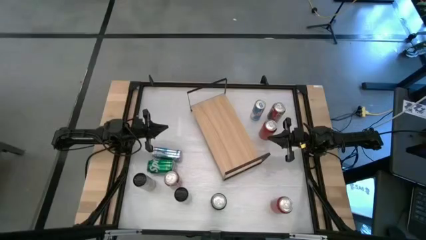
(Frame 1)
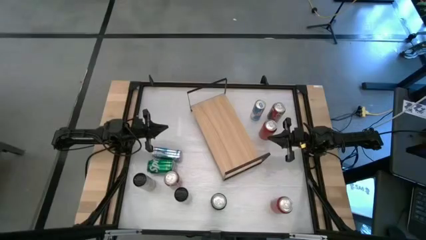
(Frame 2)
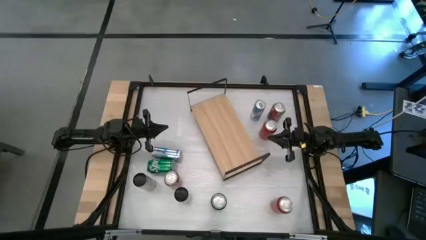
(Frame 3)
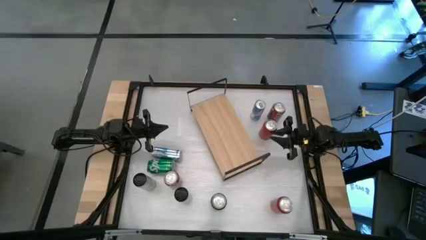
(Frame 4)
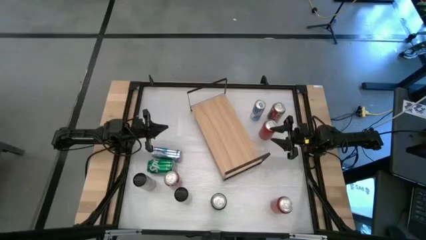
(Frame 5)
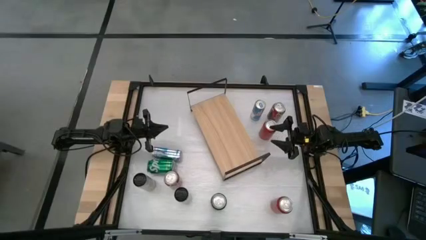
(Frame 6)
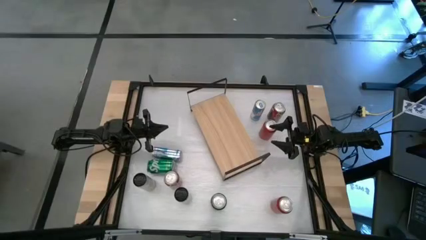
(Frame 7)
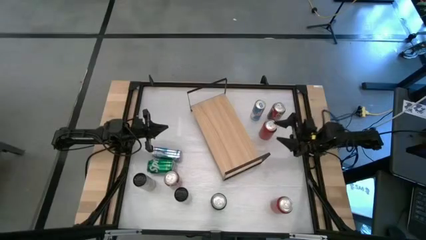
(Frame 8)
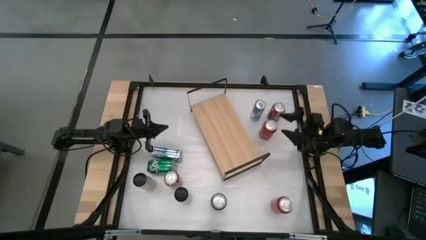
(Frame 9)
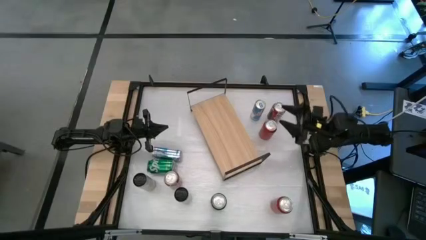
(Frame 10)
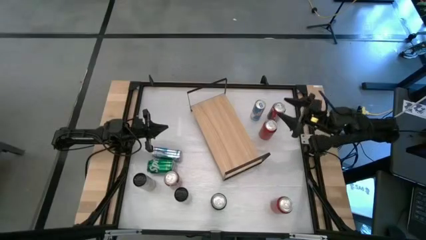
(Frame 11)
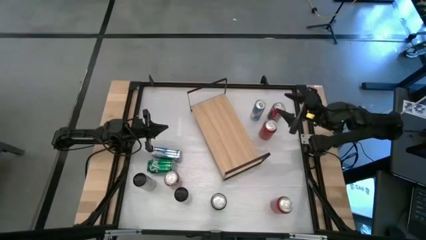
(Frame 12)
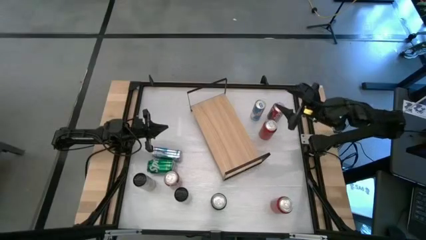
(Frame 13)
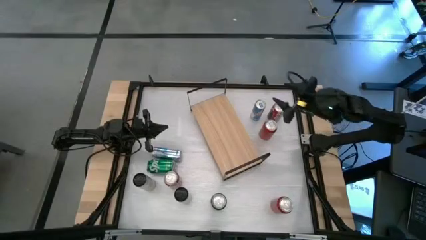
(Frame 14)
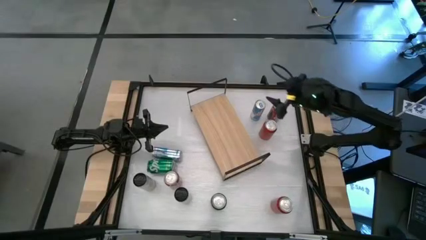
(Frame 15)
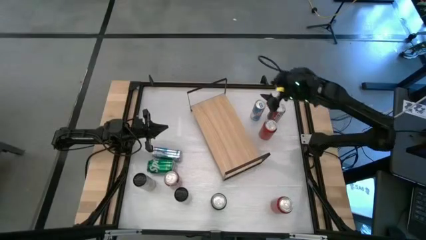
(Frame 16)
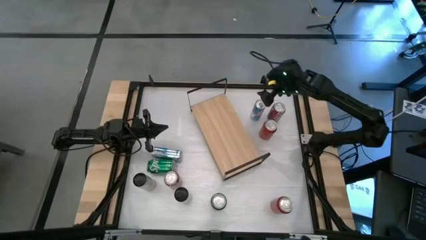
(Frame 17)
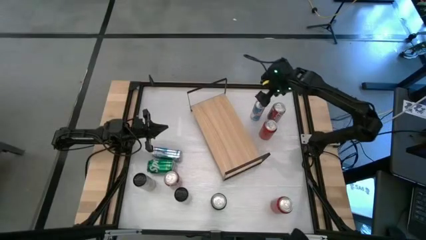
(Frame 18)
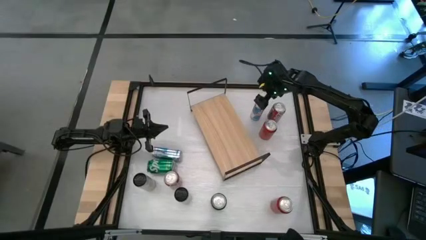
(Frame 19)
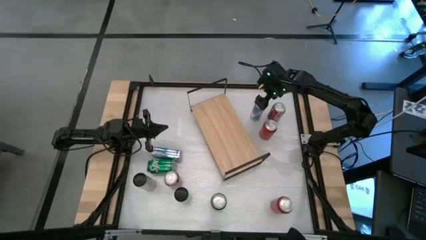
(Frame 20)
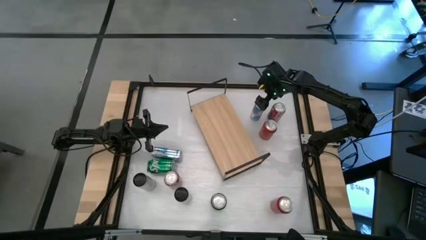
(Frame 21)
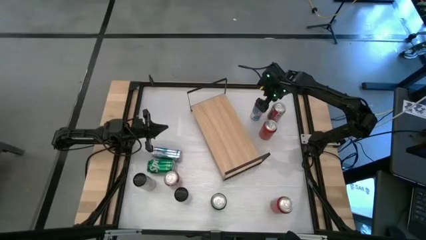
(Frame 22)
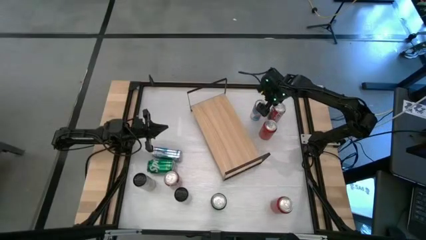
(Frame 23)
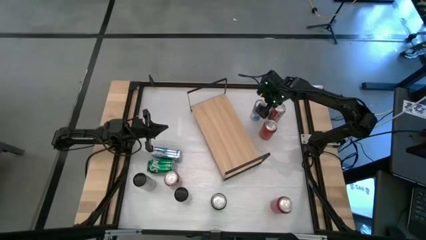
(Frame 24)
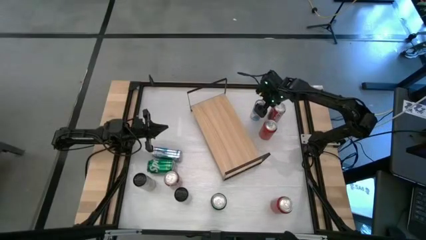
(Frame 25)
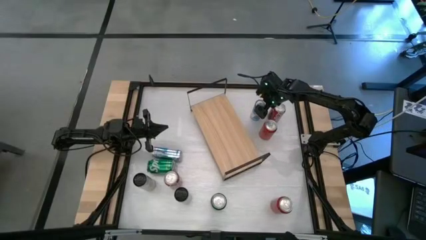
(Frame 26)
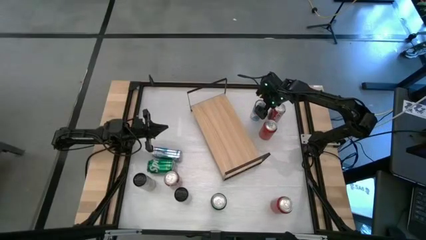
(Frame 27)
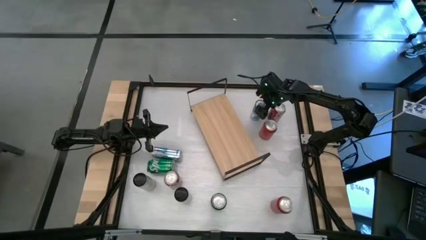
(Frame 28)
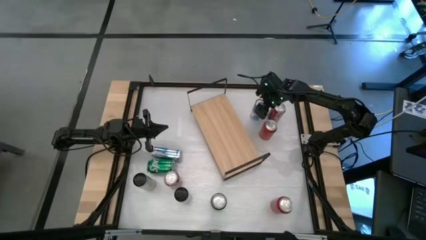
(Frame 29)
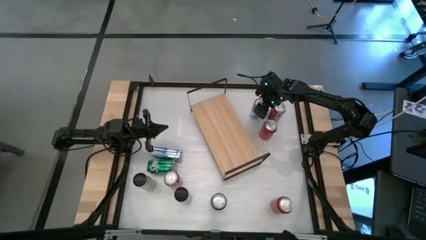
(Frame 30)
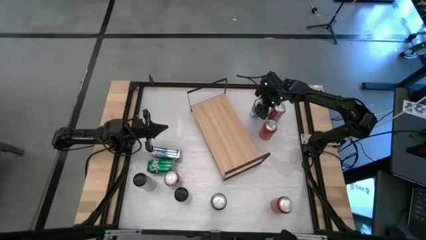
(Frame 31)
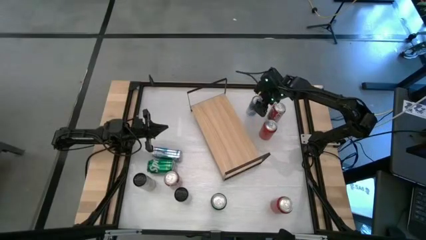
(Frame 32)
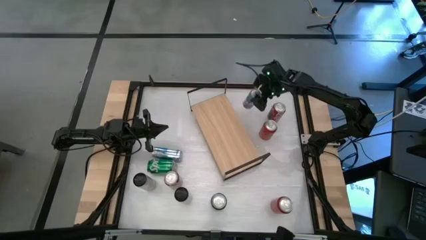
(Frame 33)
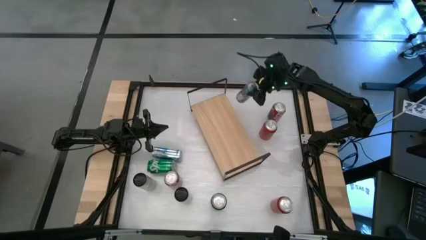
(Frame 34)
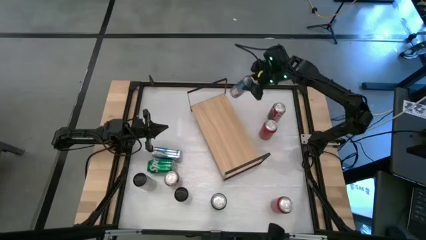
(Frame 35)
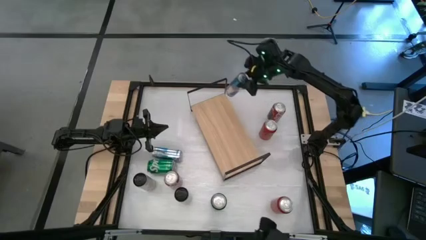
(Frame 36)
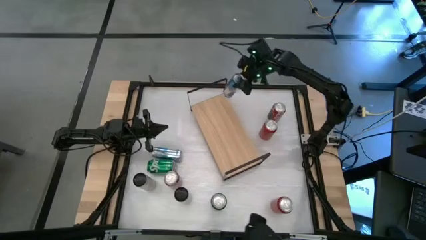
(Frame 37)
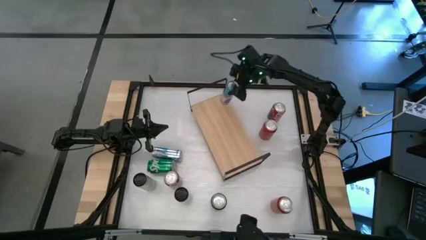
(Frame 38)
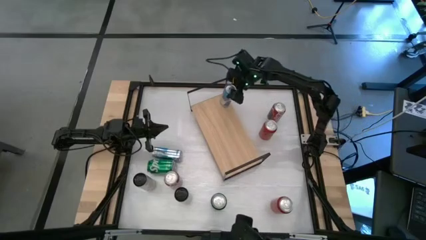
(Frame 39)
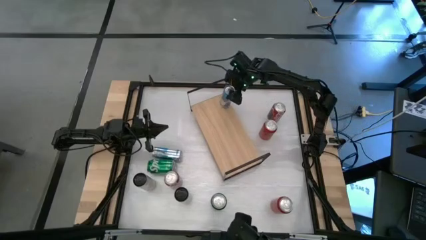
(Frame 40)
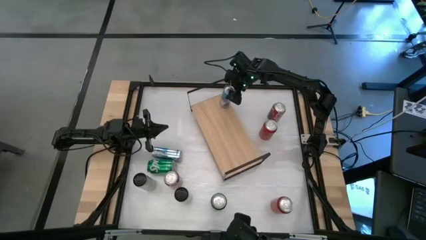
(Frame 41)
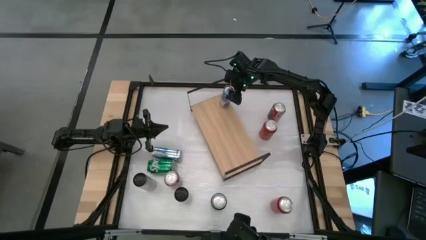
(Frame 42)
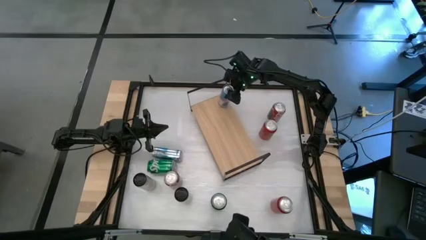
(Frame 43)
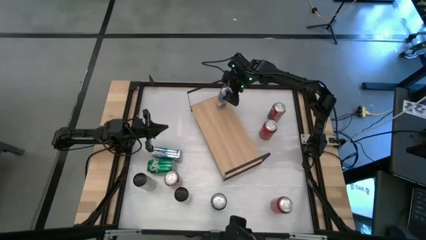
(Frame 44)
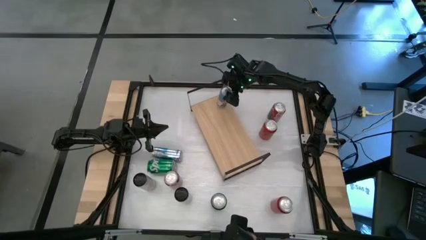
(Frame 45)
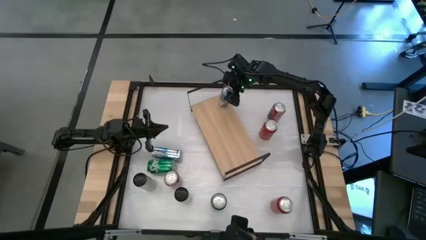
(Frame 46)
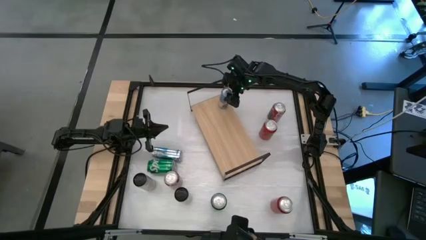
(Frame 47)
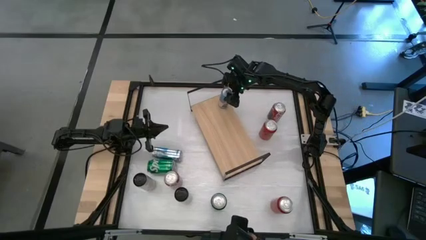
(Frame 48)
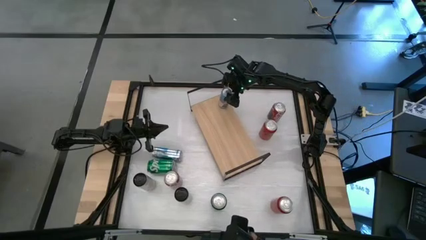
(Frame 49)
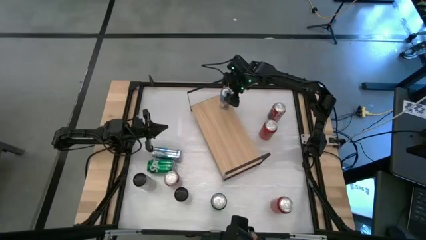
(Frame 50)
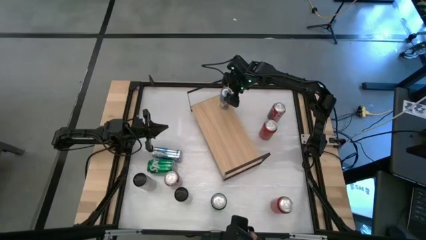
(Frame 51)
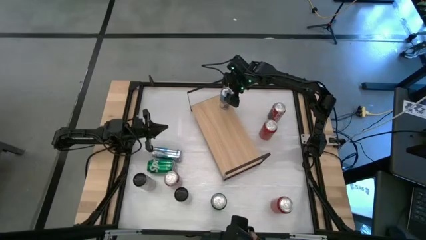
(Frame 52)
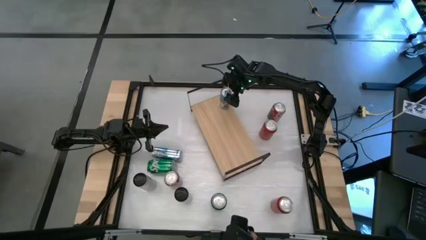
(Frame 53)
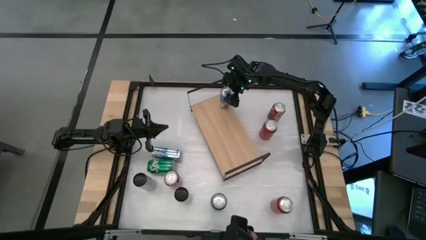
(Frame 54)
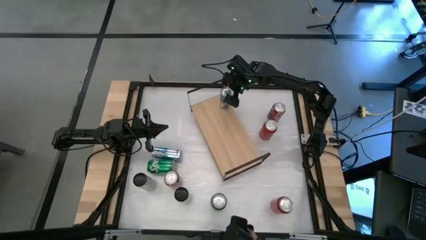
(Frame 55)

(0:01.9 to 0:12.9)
Task: Place canned beverage on shelf
Put the right blue soda can on the shelf

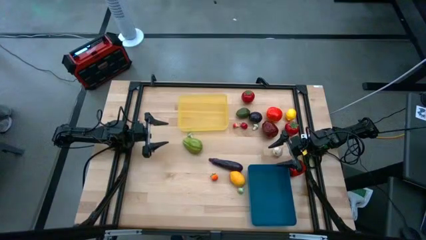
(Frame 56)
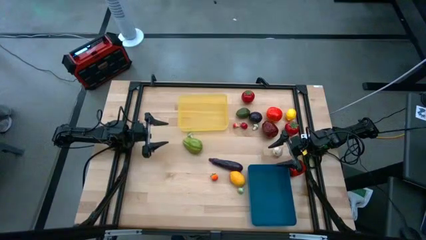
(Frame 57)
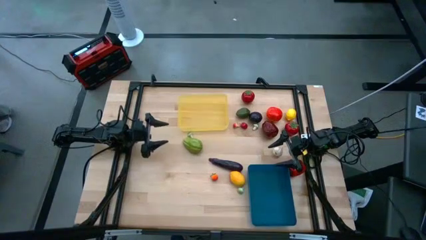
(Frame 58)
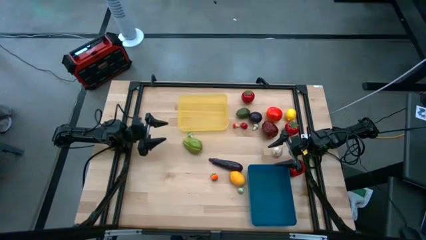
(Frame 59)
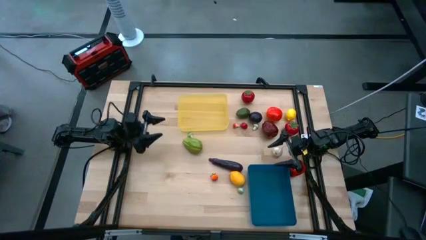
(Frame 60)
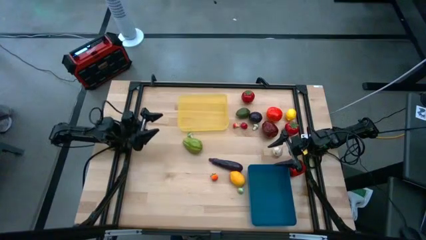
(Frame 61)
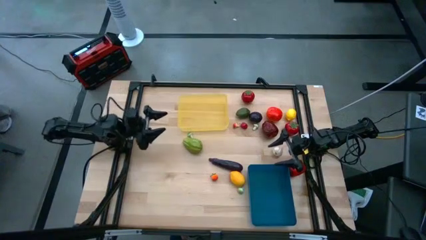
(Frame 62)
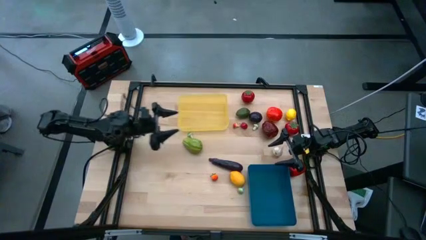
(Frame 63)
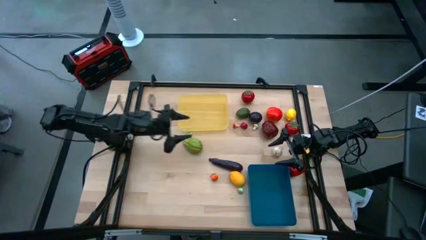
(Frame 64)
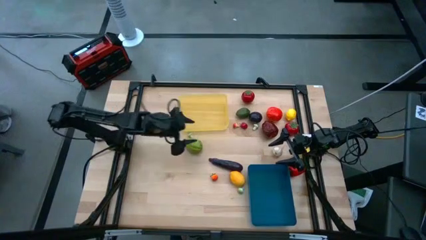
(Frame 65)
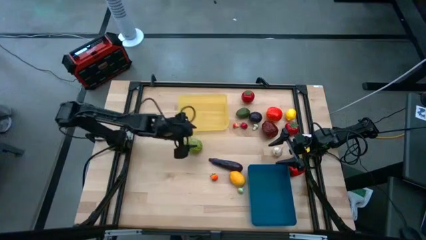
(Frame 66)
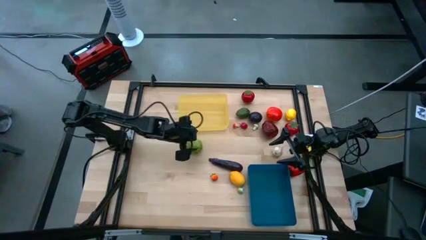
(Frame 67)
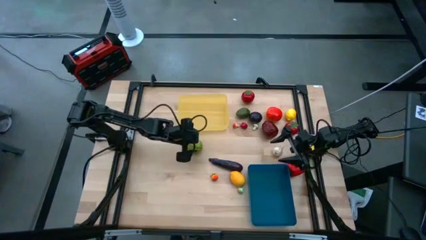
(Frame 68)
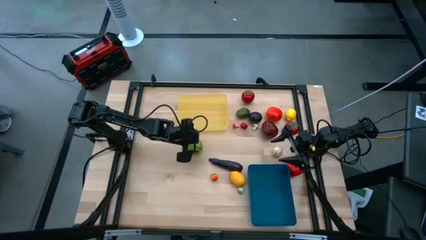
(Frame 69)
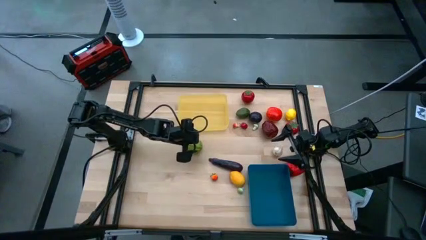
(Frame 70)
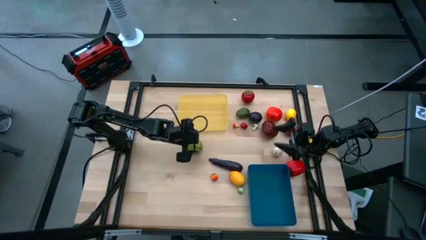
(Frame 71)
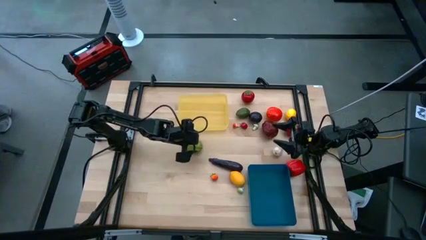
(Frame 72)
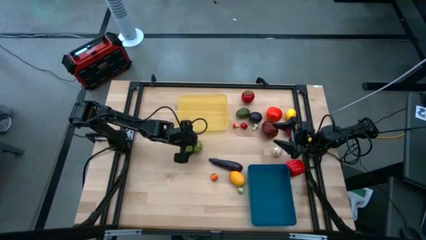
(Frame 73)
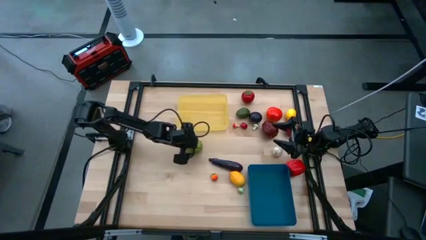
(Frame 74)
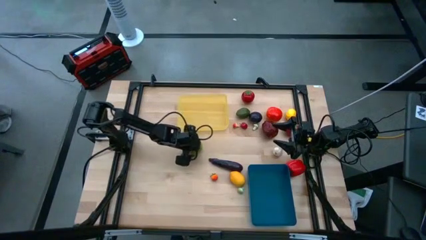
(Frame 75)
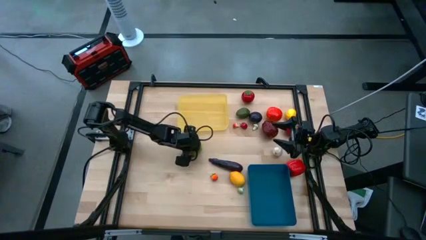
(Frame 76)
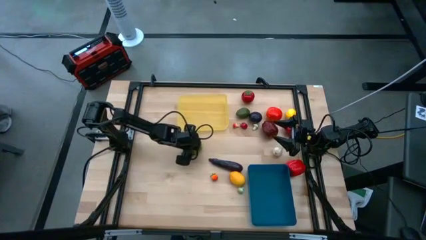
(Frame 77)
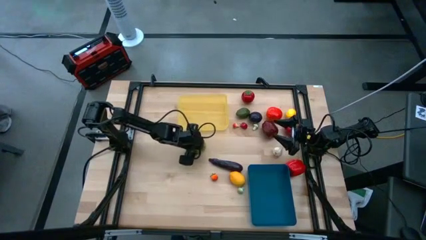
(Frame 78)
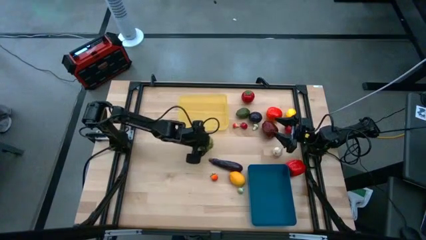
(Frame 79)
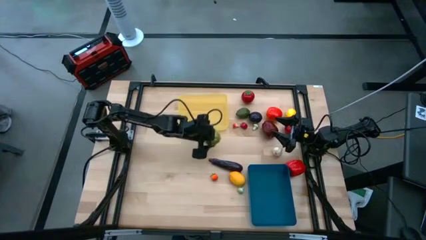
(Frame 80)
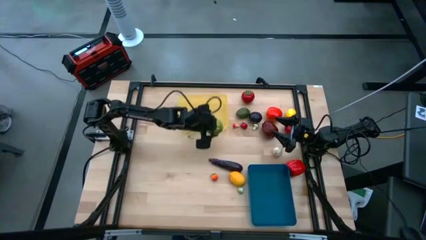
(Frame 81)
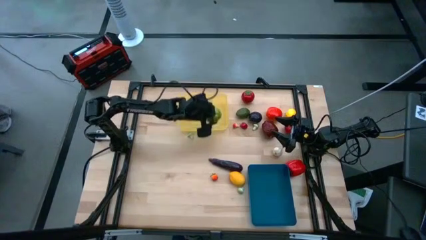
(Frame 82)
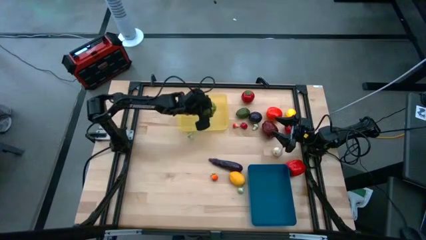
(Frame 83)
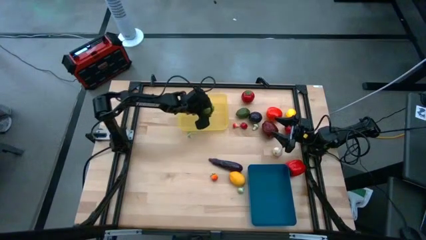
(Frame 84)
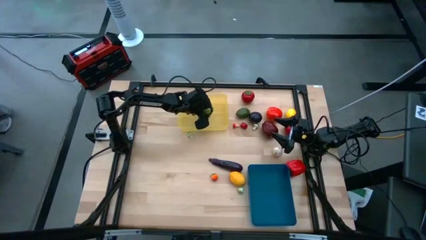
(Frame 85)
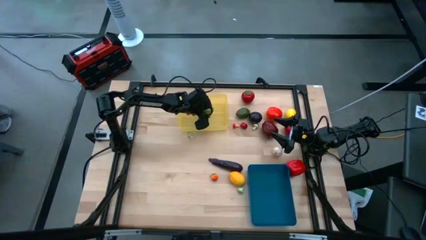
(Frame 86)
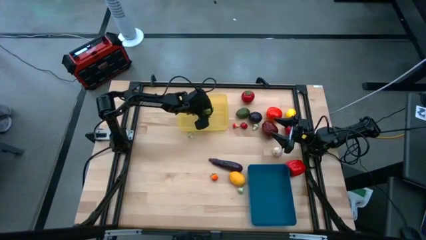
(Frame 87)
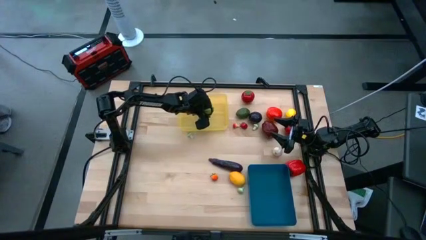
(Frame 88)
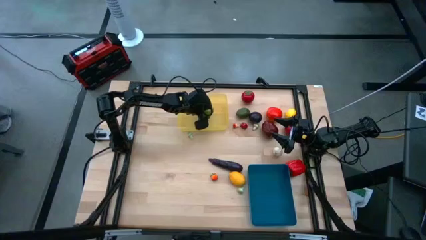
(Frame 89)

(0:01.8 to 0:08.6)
Task: Sort produce into baskets
Put the green chayote into the yellow bin
